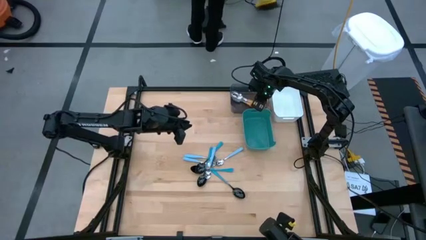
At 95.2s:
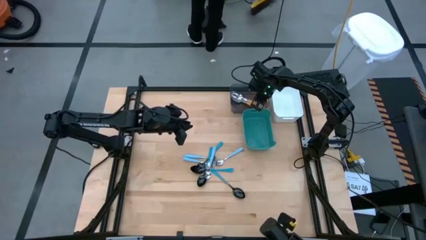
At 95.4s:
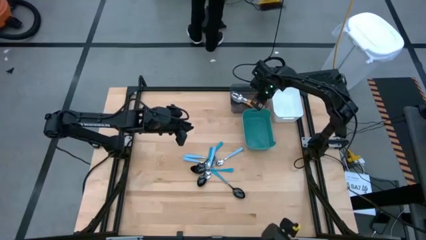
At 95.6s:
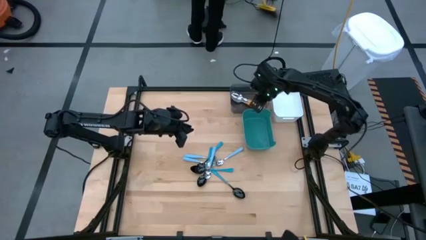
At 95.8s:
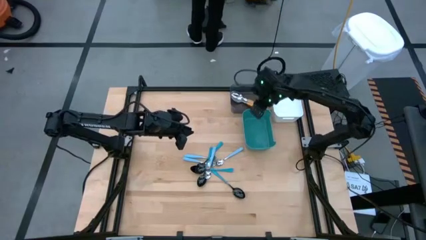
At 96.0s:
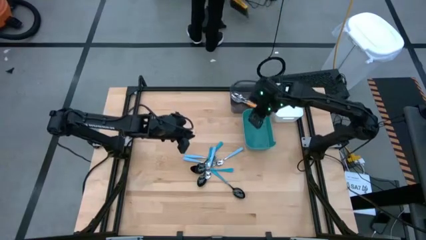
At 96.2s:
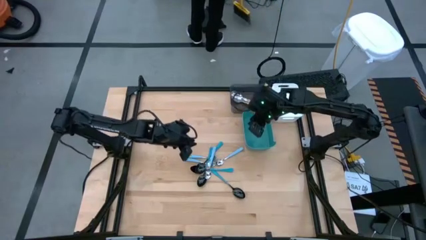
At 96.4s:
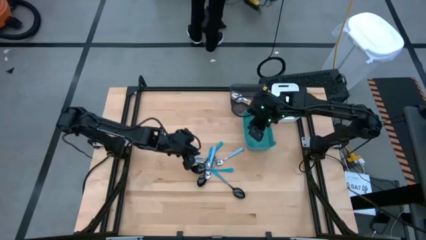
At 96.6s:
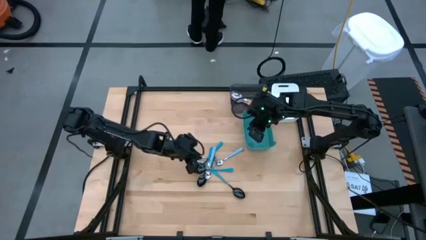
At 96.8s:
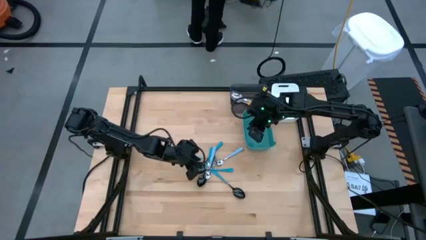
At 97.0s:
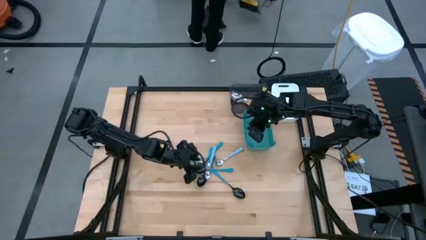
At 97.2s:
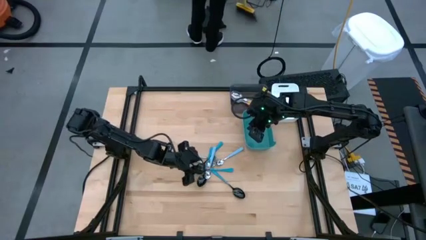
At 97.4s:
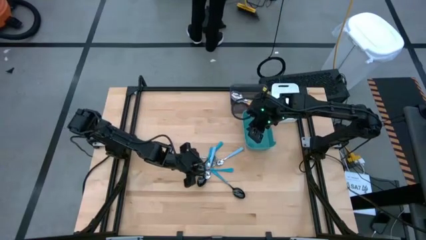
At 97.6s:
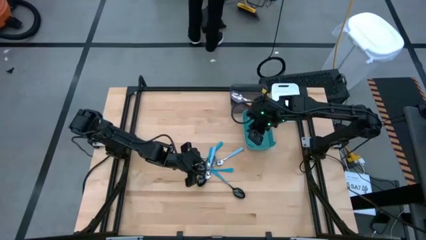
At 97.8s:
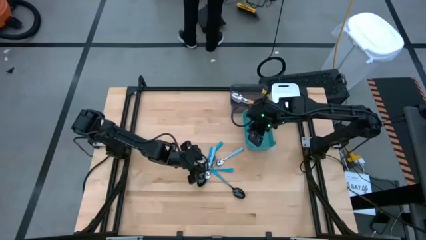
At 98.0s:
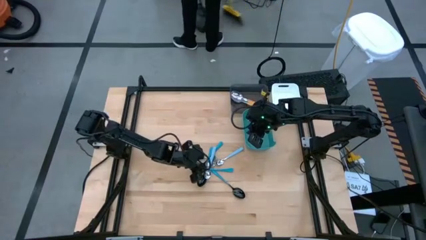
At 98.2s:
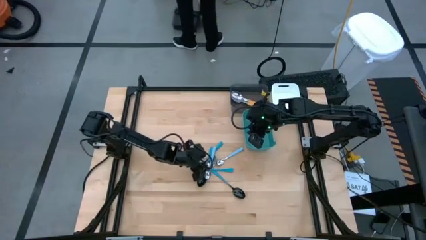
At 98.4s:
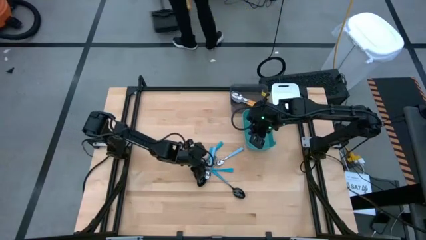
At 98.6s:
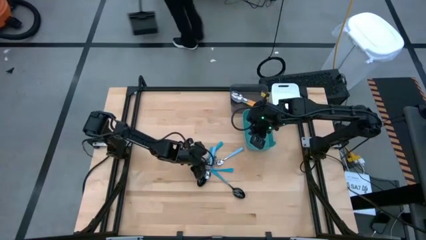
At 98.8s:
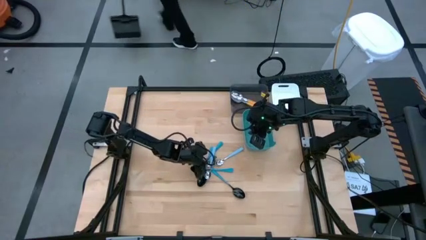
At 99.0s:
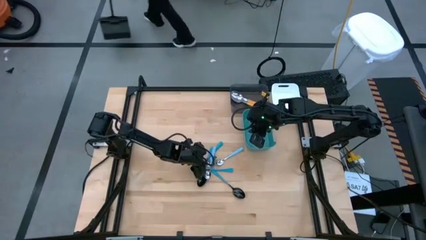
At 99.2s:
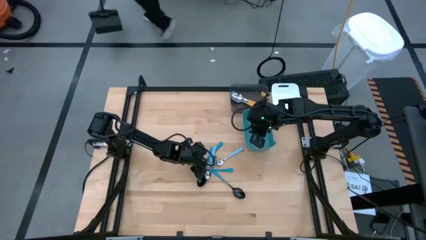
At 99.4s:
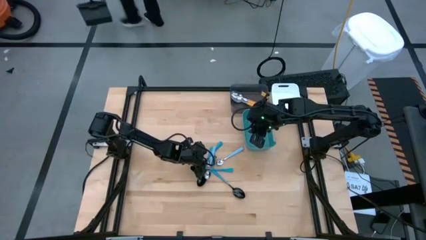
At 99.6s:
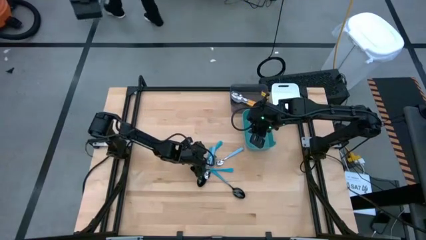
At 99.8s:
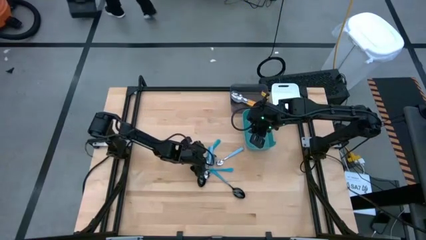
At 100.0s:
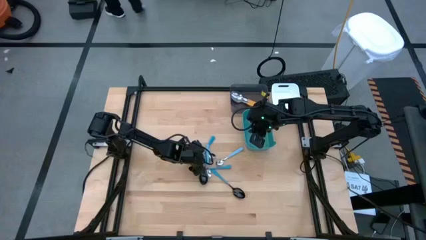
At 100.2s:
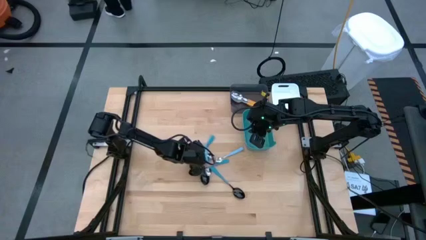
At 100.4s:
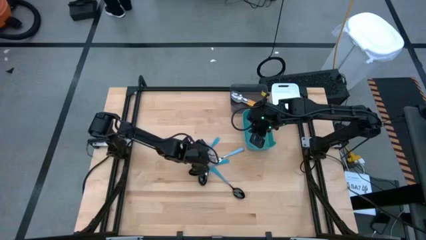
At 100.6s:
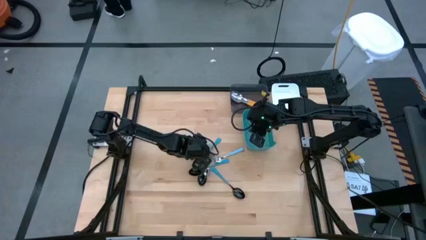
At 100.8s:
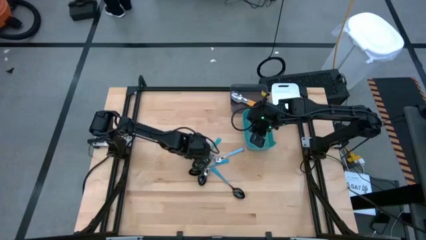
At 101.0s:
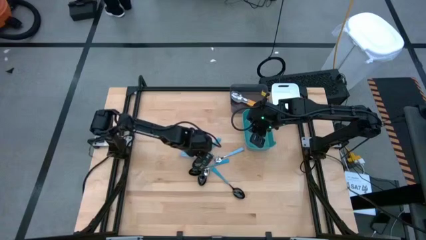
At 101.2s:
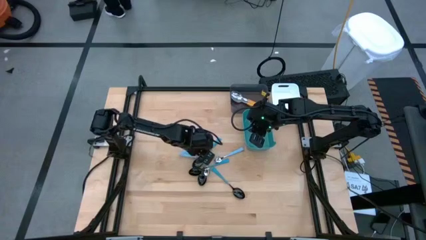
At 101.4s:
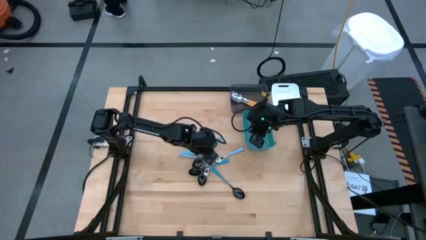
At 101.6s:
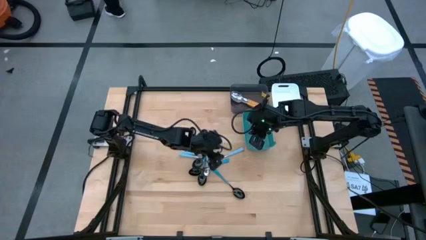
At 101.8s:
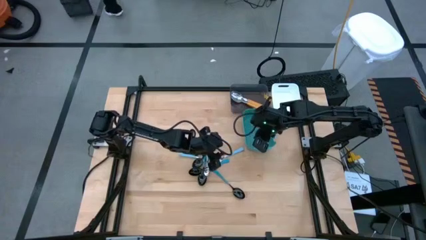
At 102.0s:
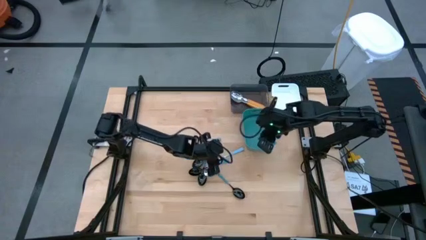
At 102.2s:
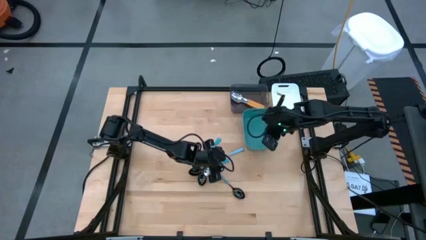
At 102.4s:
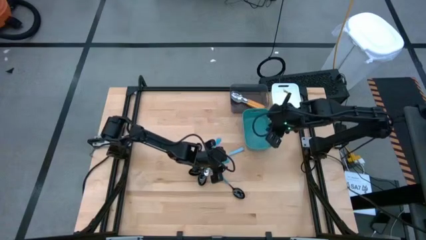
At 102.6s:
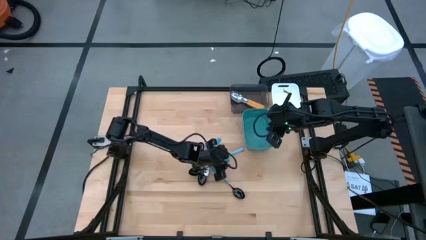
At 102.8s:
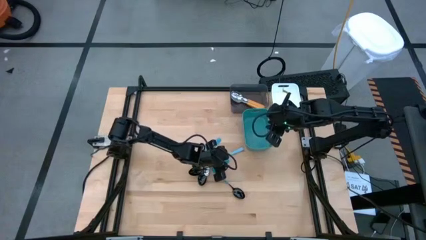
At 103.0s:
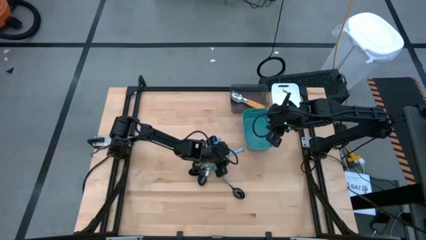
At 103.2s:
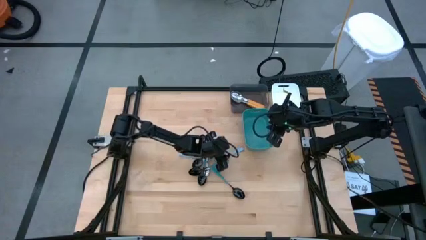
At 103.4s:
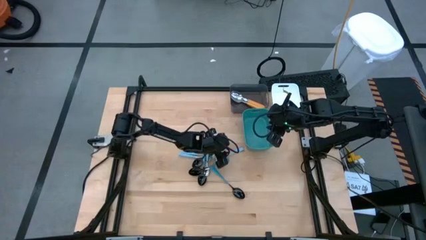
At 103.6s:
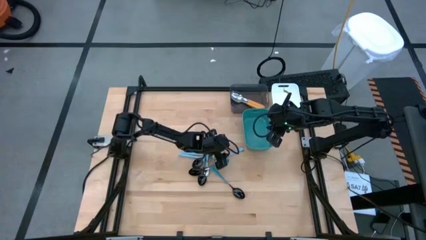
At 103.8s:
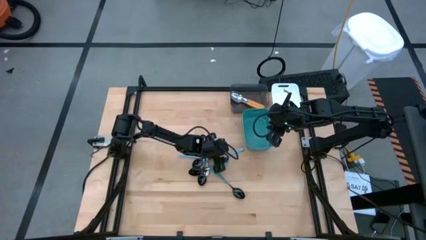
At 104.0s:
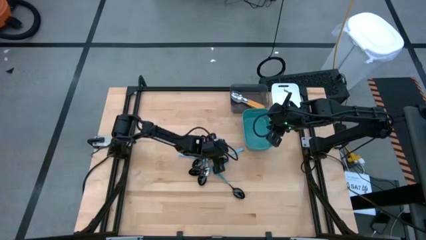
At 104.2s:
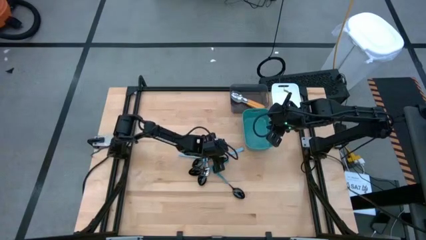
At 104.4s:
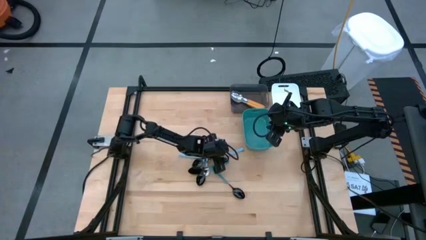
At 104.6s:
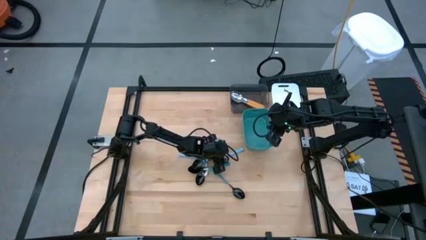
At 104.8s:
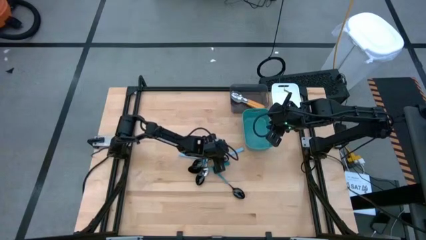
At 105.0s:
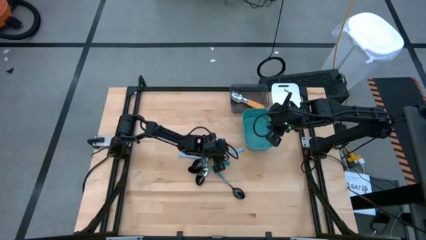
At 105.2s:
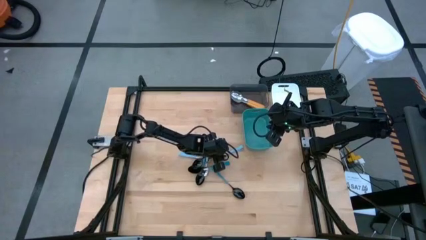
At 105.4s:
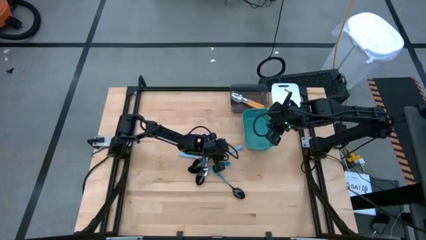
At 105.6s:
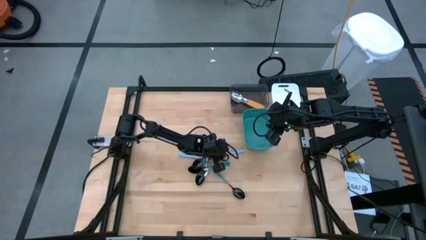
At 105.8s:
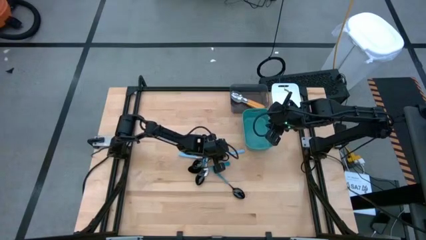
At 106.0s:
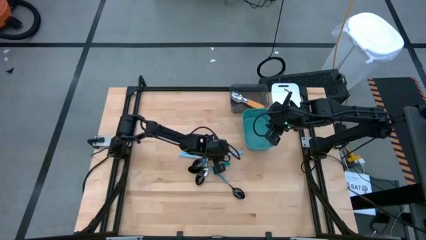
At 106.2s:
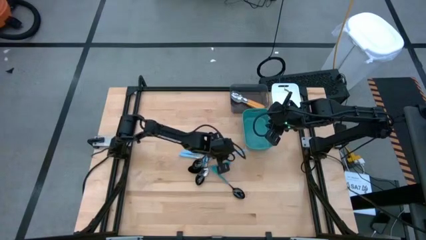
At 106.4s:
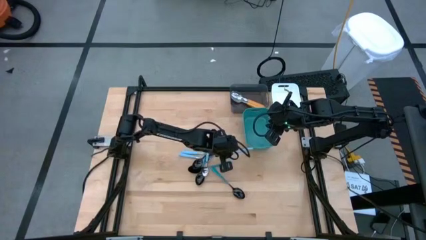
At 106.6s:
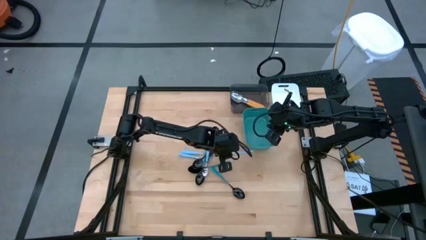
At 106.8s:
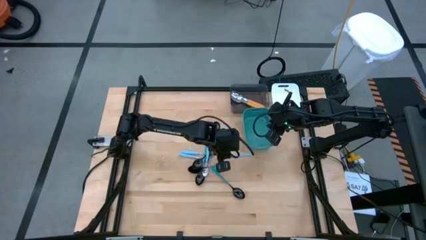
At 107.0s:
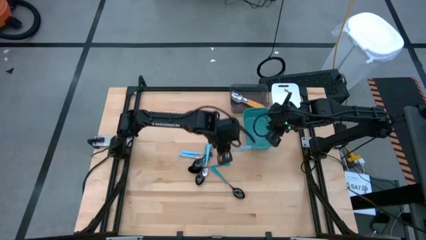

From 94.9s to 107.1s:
Task: Sort silverware by color (type)
Put the light blue spoon into the white bin

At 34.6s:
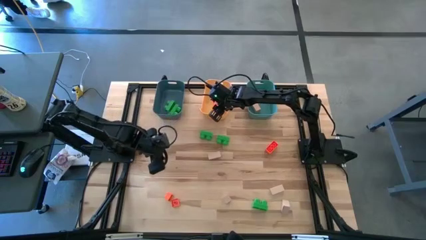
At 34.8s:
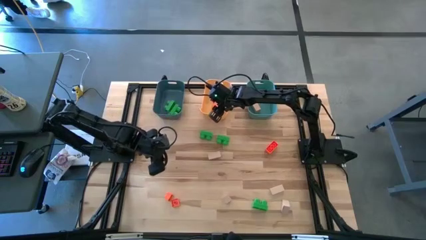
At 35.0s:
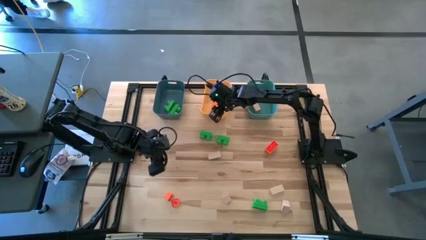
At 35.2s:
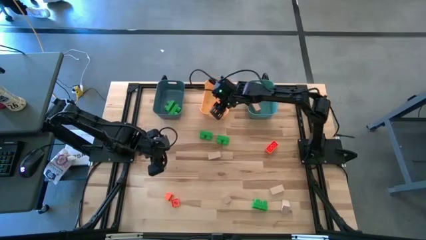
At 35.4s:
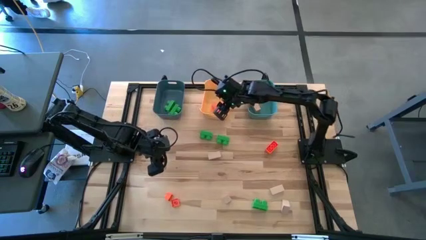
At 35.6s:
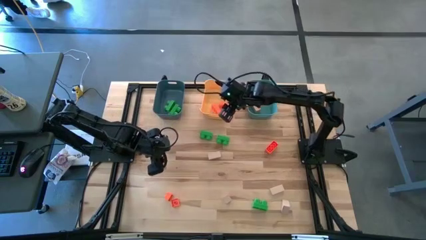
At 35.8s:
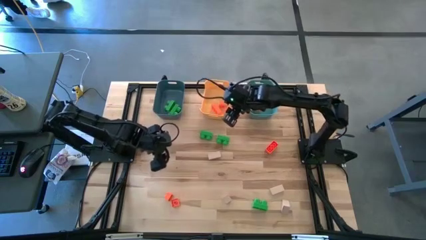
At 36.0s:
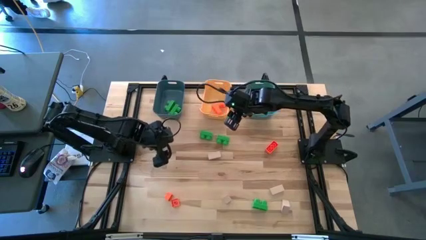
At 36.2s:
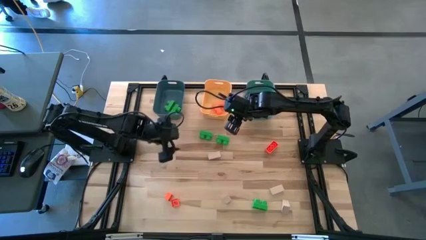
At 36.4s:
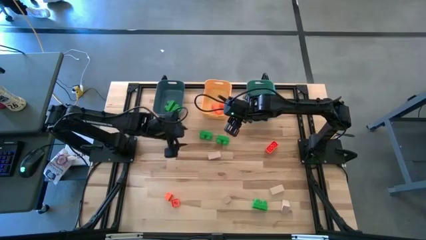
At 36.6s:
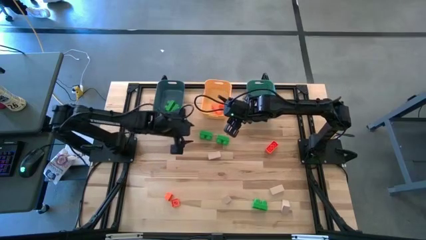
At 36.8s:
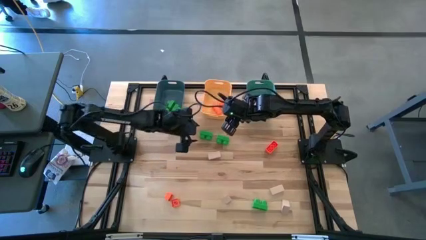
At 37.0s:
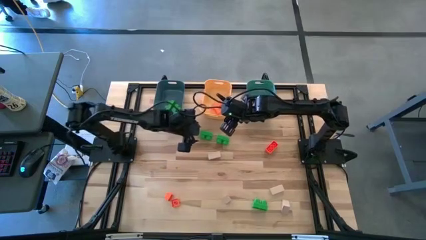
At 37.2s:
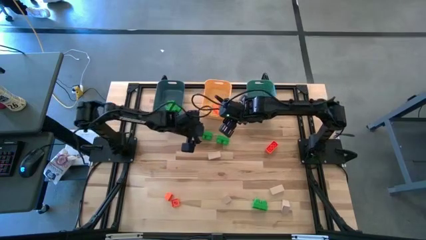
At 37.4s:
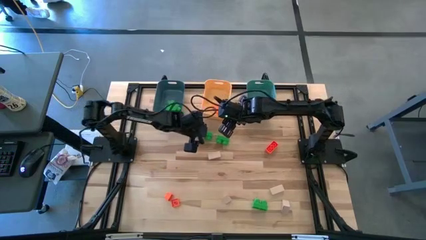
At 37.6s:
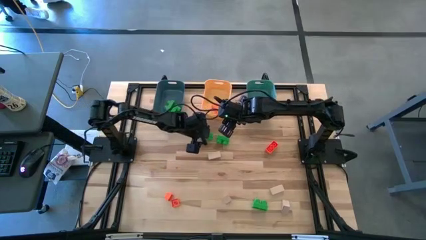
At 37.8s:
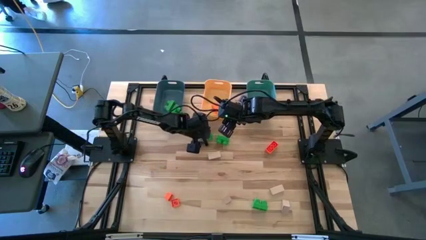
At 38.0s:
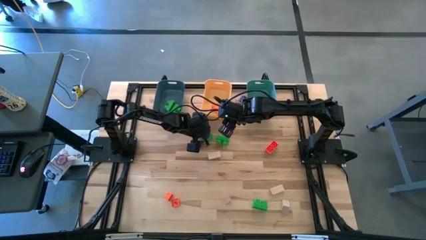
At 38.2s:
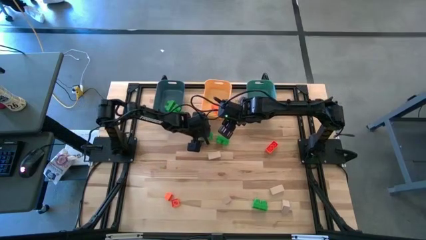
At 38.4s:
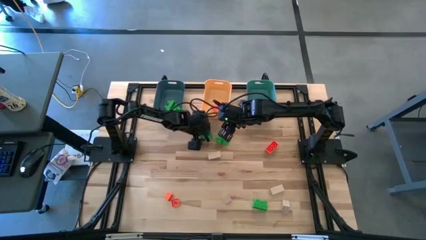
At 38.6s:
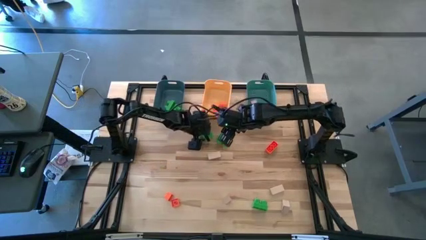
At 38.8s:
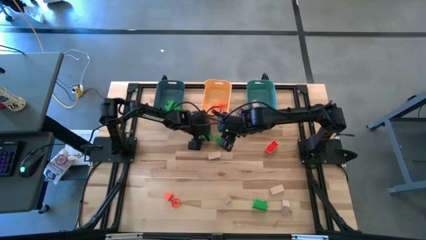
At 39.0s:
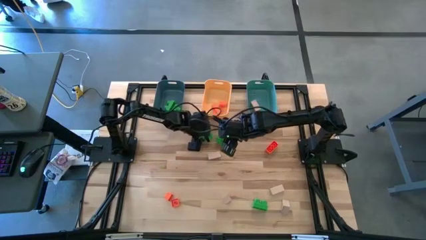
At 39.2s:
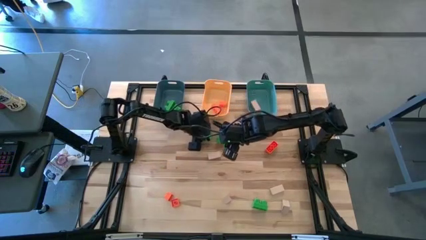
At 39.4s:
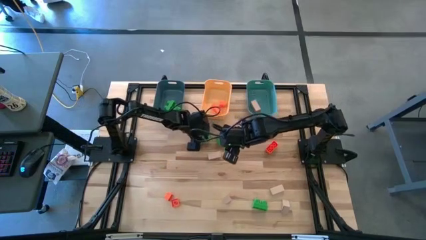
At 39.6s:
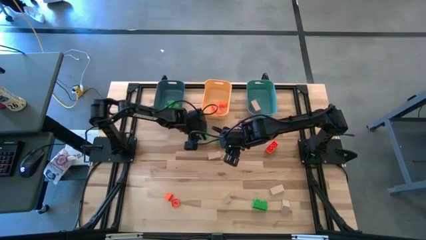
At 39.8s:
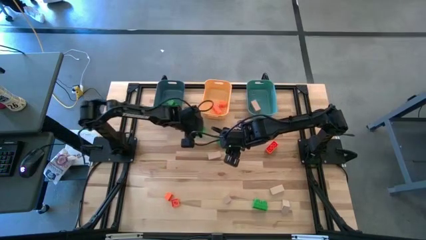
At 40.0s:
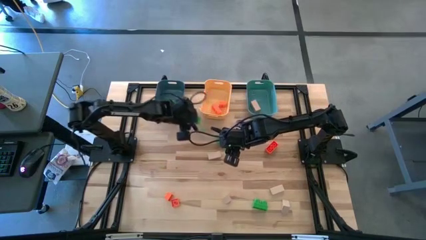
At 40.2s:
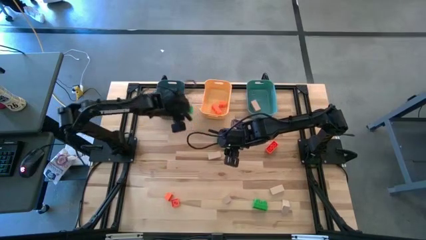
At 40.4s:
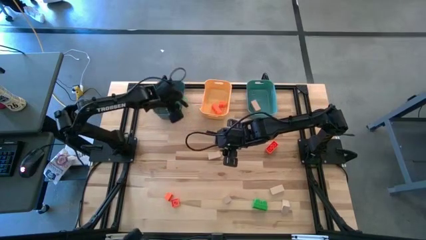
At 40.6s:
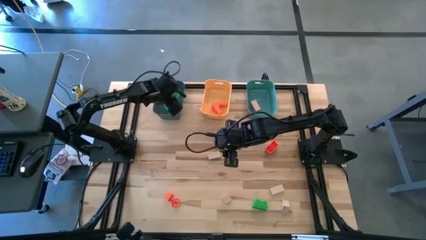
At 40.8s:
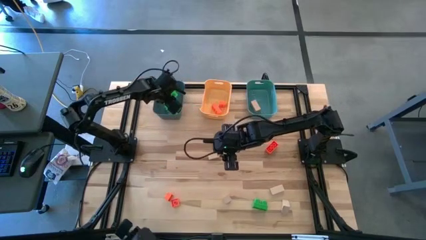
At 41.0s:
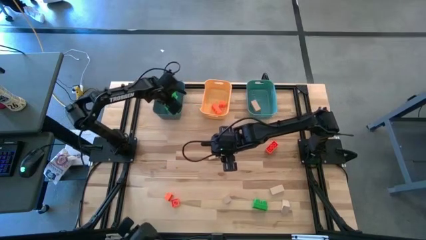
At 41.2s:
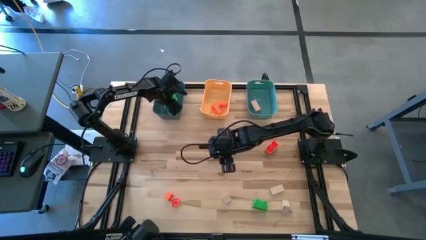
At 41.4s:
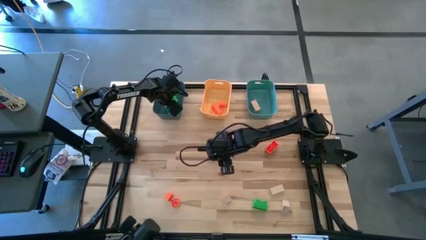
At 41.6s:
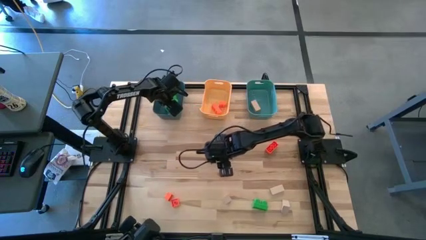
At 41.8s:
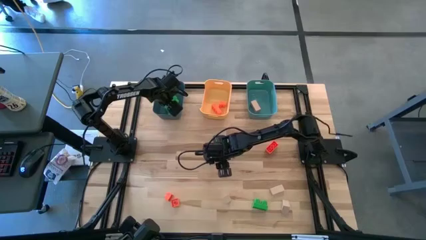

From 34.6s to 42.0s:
Task: Sort & place blocks by color
Put the green game piece into the blue bin
